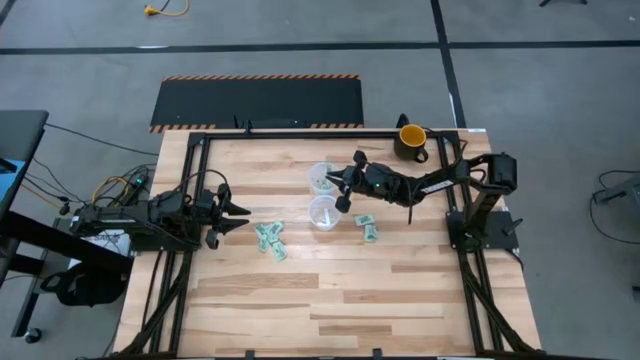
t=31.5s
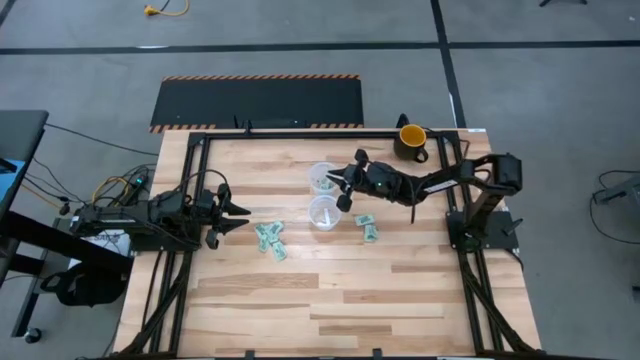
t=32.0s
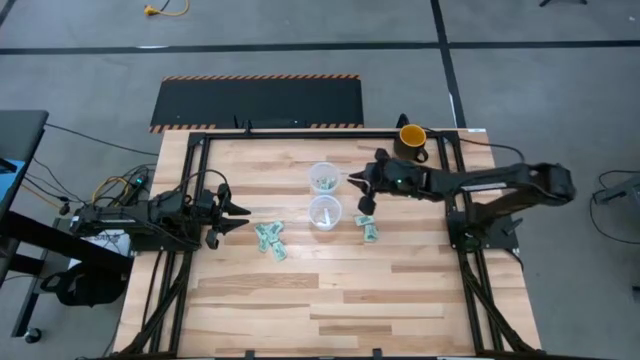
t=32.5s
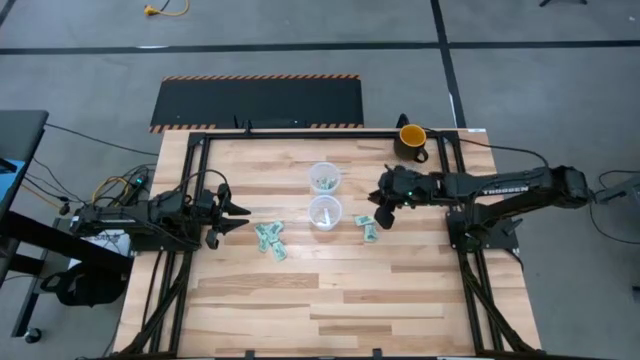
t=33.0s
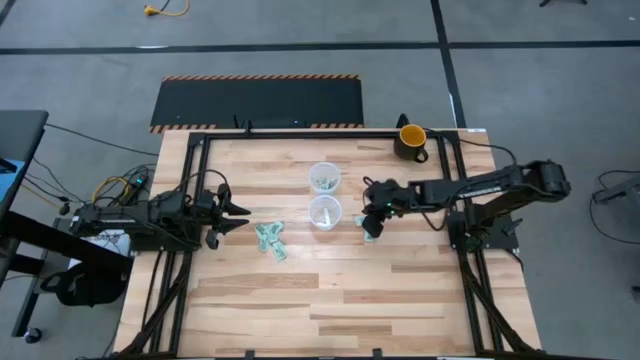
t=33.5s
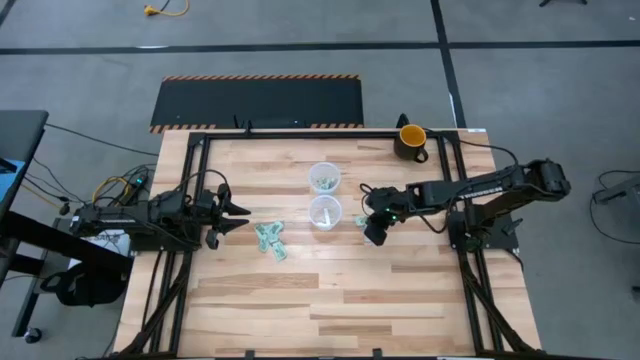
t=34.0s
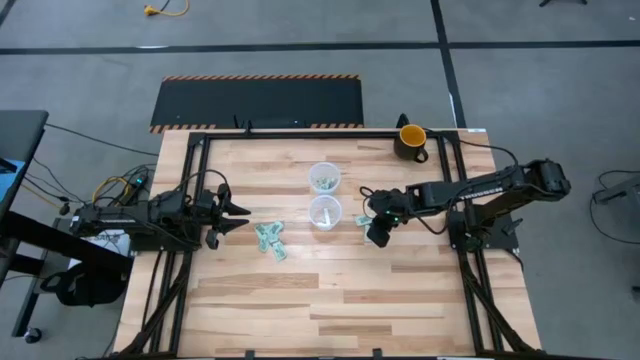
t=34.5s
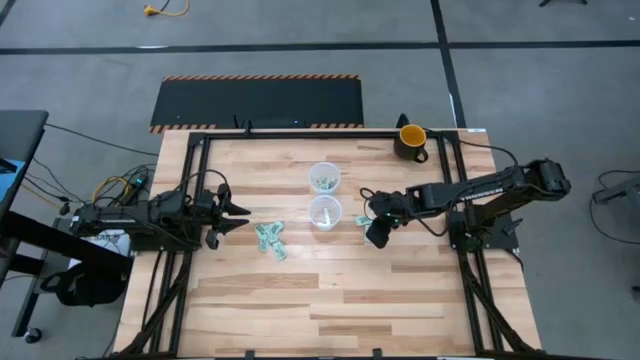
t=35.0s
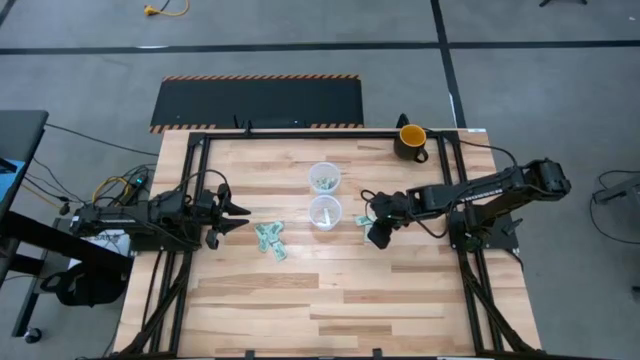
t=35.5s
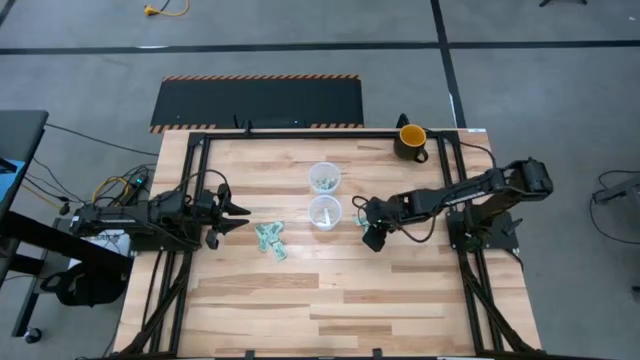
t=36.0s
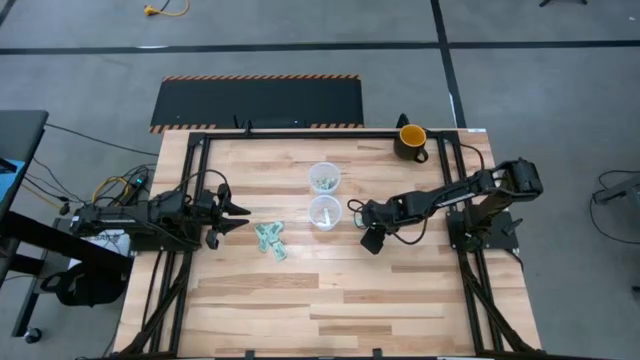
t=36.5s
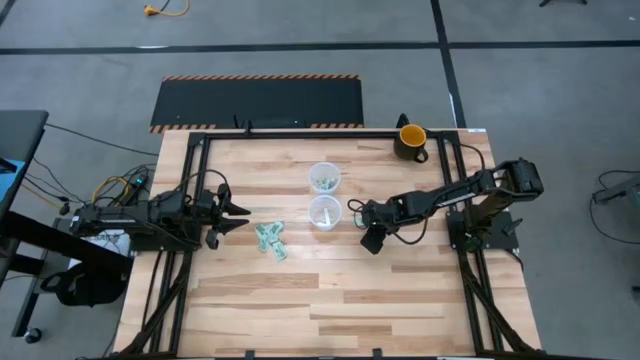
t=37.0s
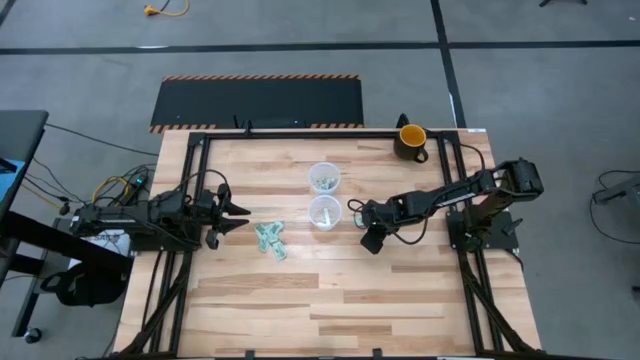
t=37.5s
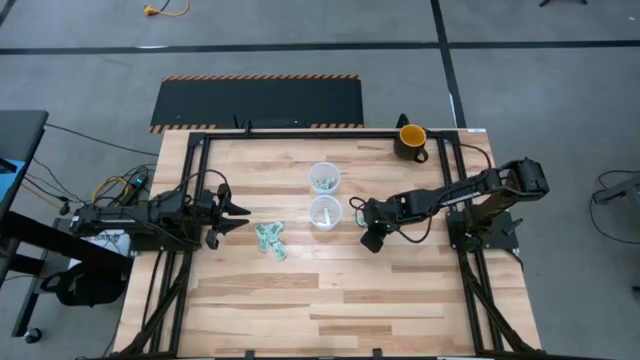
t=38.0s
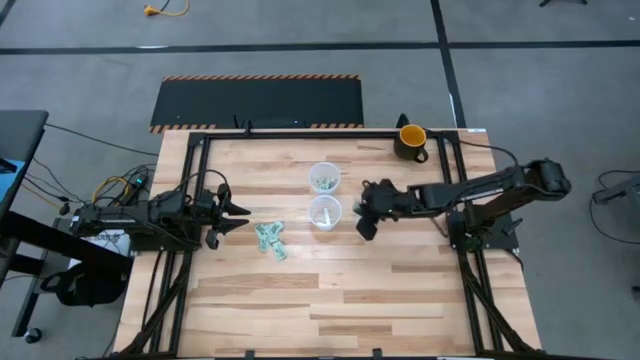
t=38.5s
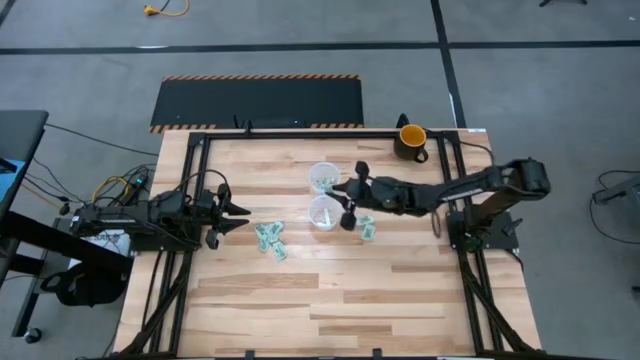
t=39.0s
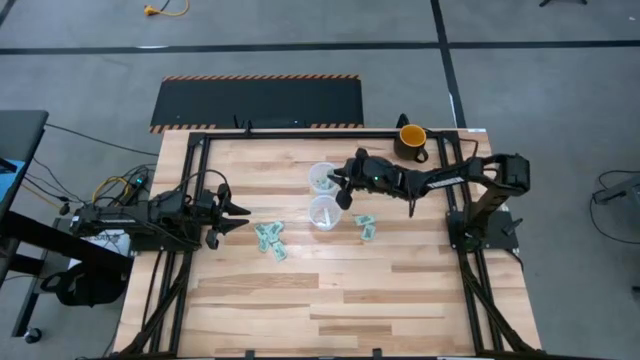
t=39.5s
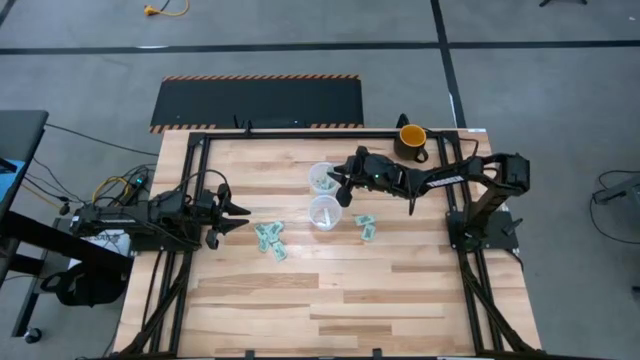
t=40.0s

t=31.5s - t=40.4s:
Task: Pick and place items into bin
Put the green stevia packet into the top transparent bin

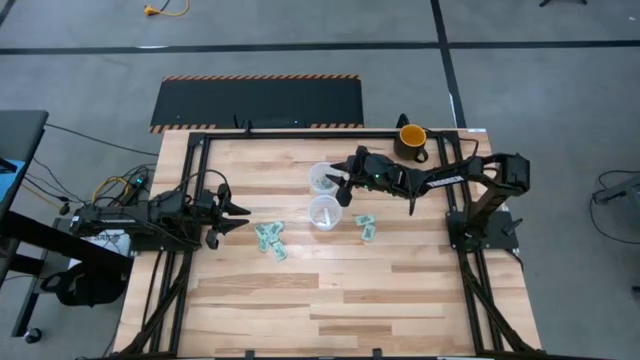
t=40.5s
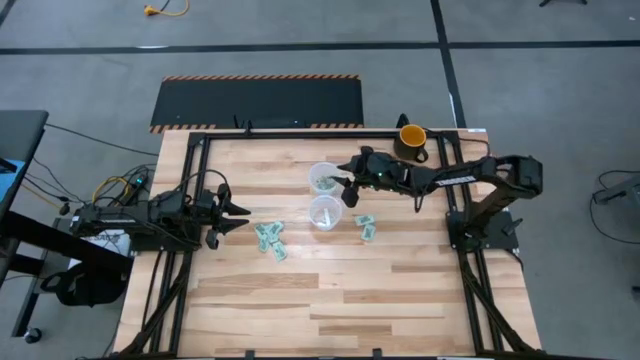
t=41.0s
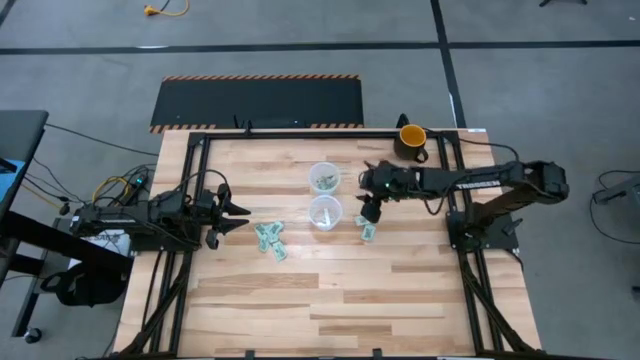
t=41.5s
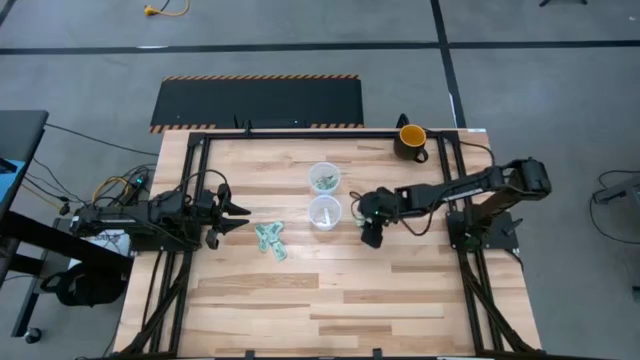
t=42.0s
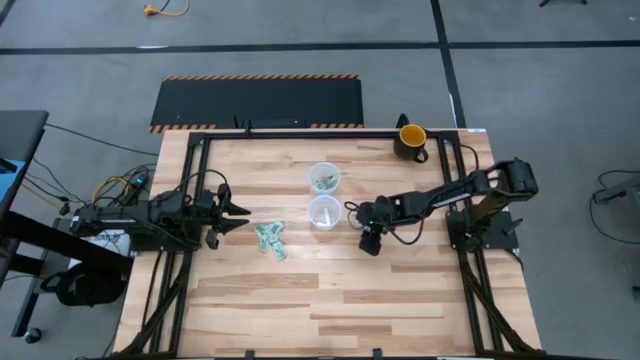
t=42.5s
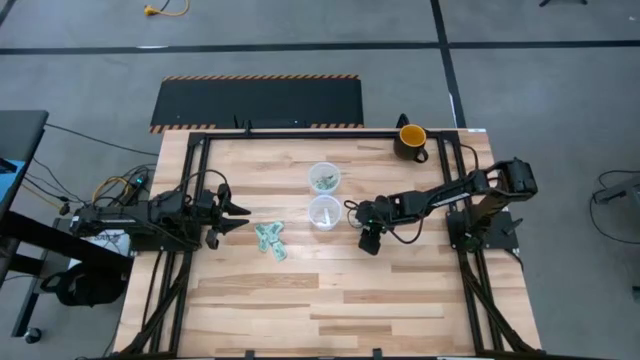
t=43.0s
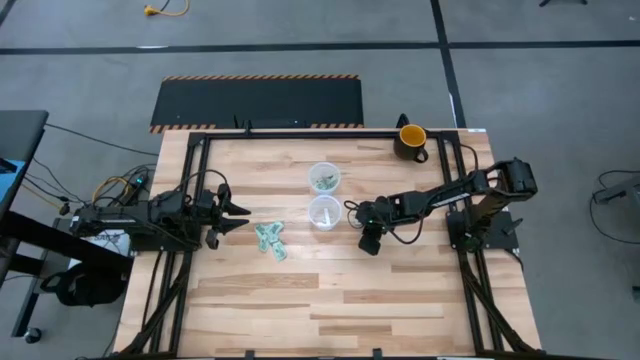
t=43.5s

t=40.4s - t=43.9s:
Put the green stevia packet into the top transparent bin

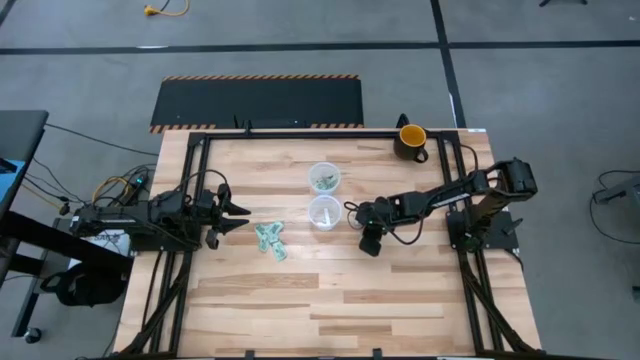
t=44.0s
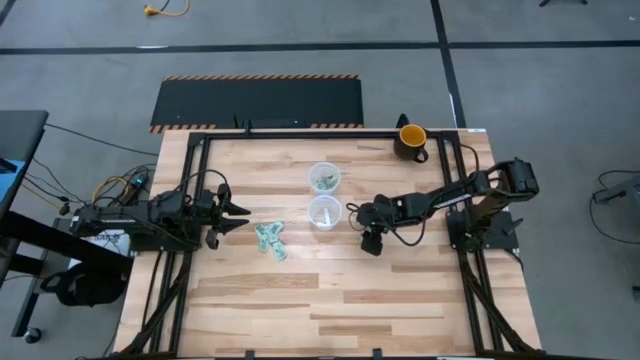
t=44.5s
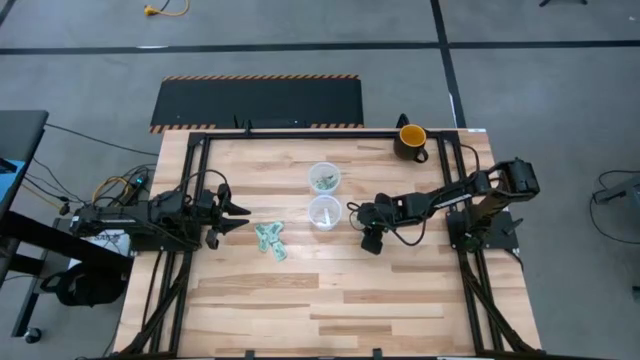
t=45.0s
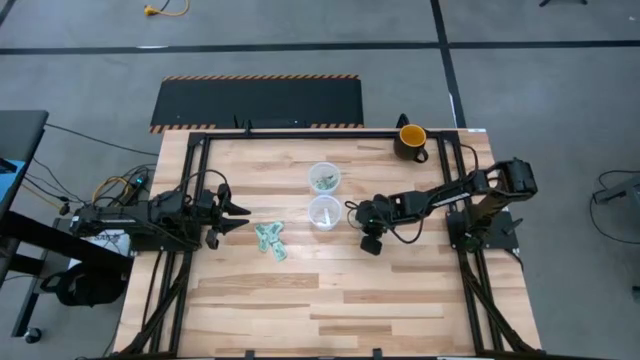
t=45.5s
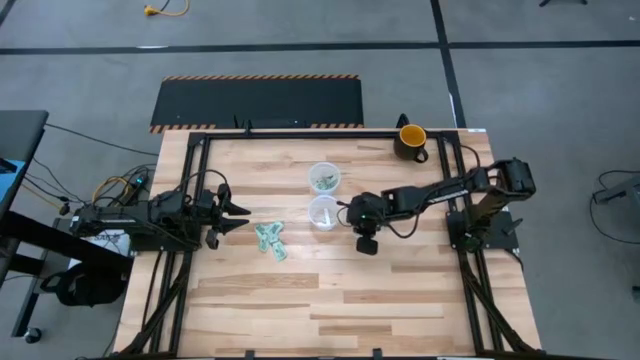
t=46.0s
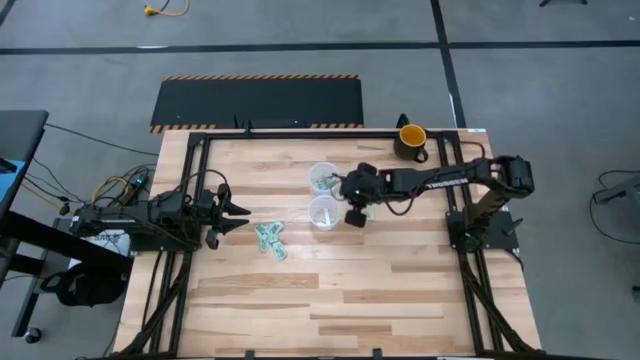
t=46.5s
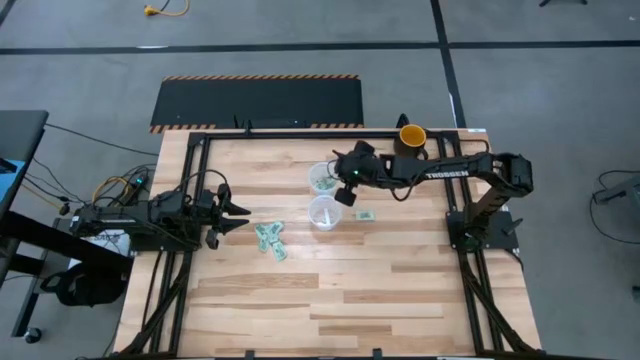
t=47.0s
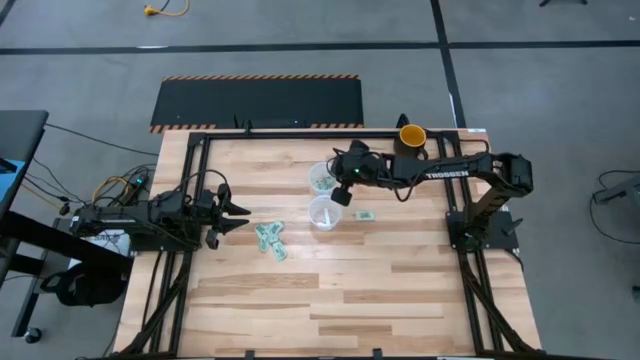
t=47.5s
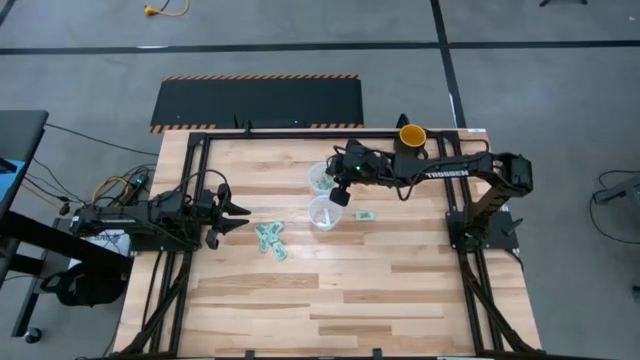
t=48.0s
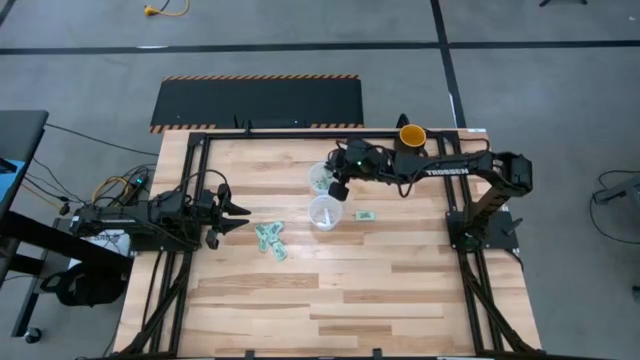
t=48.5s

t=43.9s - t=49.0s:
Put the green stevia packet into the top transparent bin

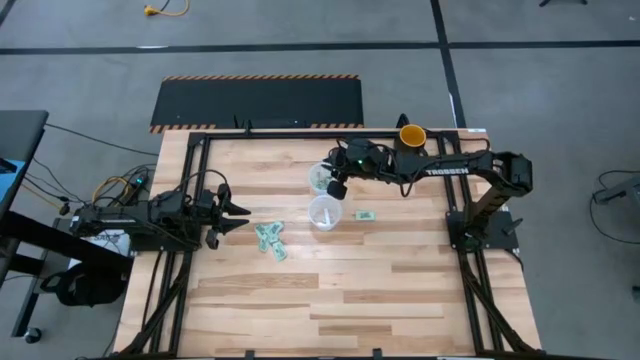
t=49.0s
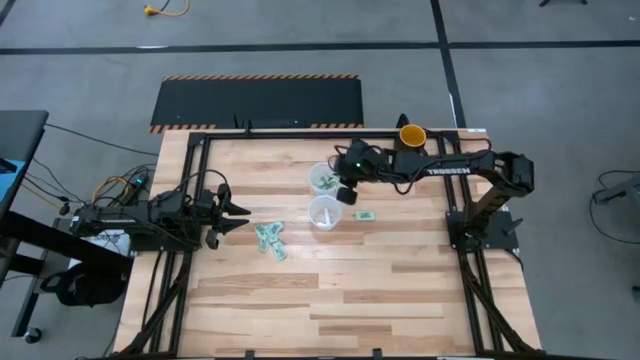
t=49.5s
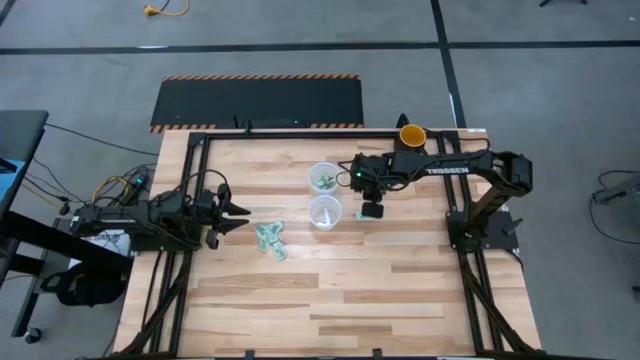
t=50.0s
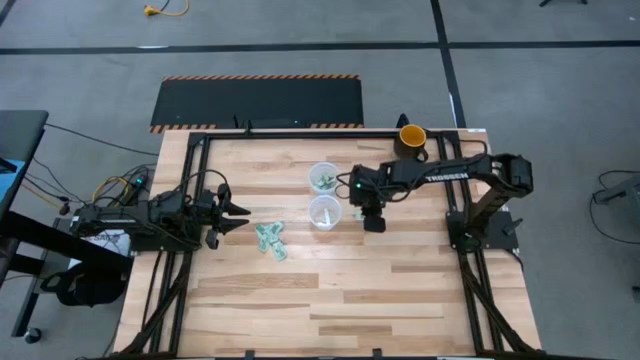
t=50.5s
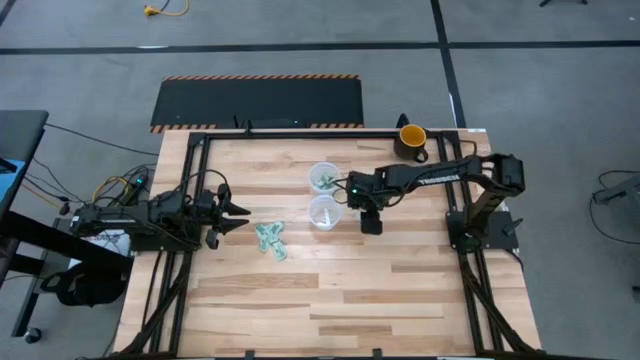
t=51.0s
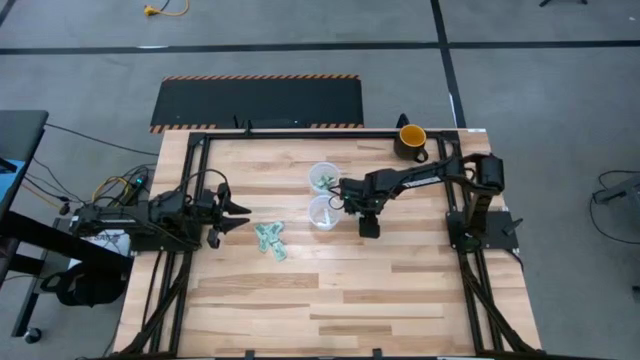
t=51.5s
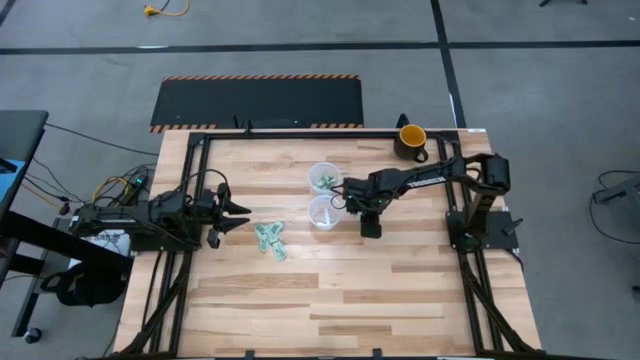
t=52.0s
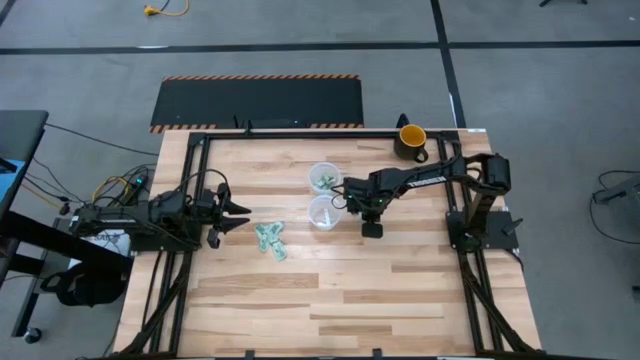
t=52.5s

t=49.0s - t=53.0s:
Put the green stevia packet into the top transparent bin

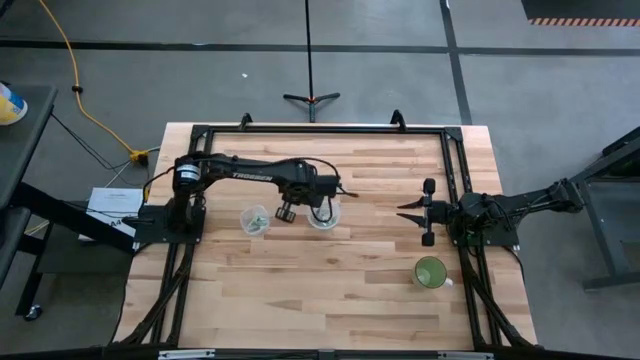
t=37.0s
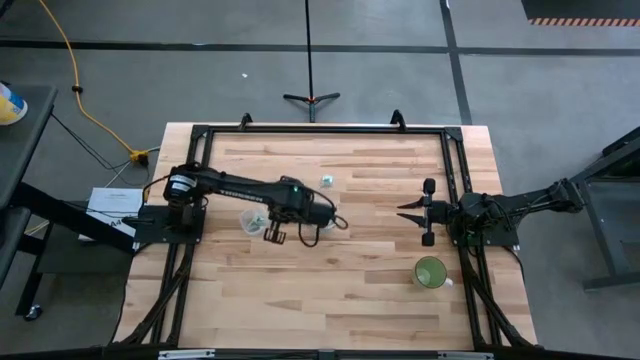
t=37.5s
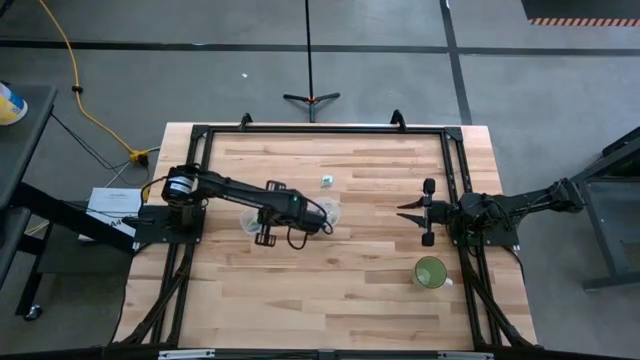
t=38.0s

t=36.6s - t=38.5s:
Task: Pick and place Stevia / Truvia into bins
Put the white stevia packet into the left transparent container
